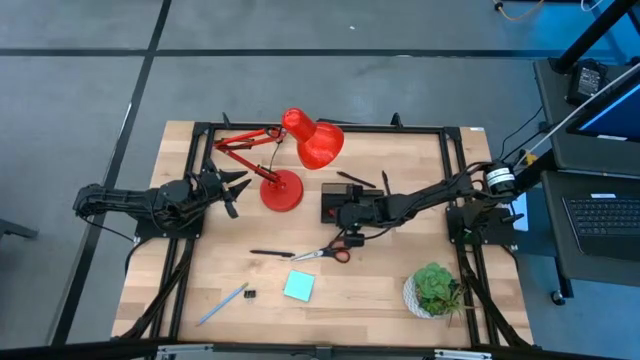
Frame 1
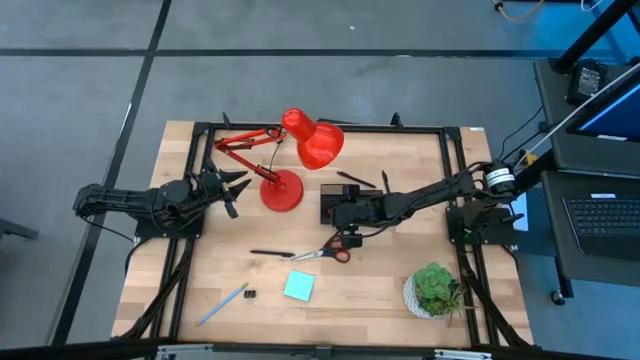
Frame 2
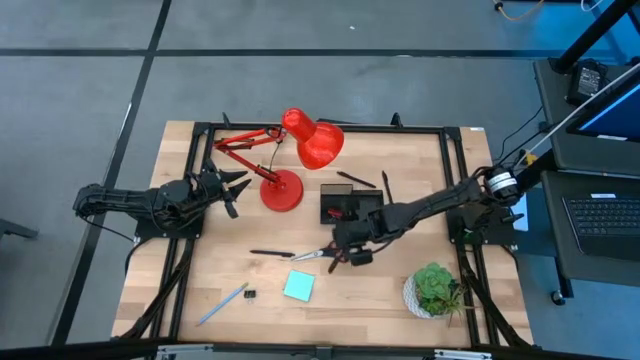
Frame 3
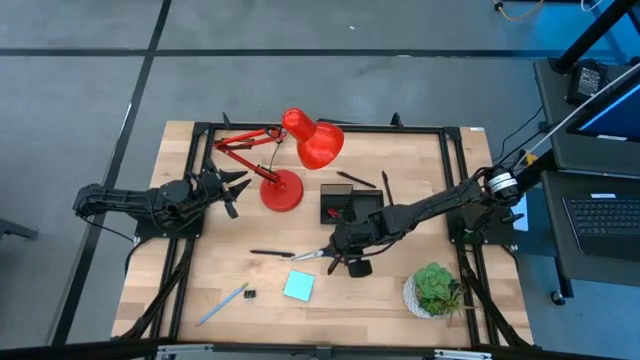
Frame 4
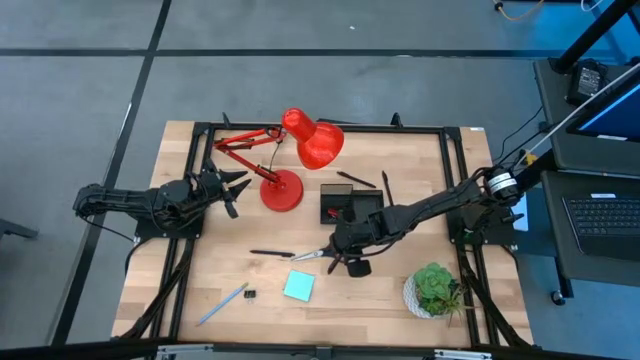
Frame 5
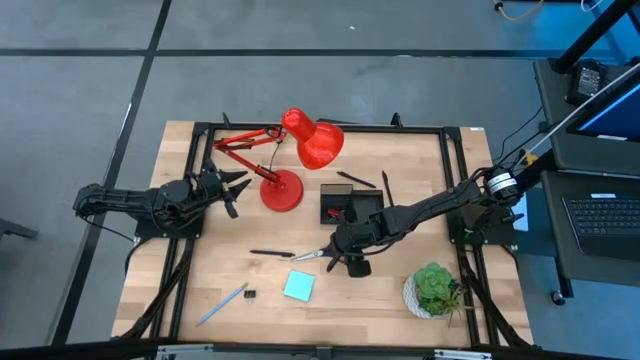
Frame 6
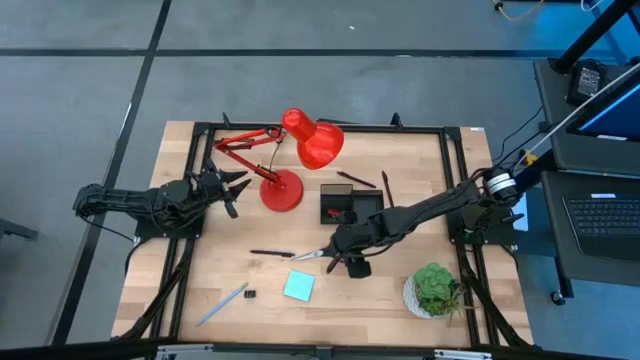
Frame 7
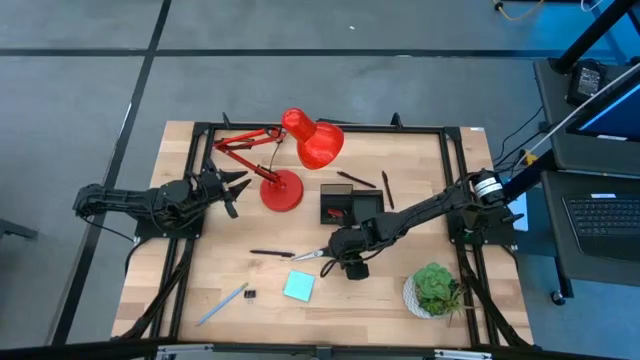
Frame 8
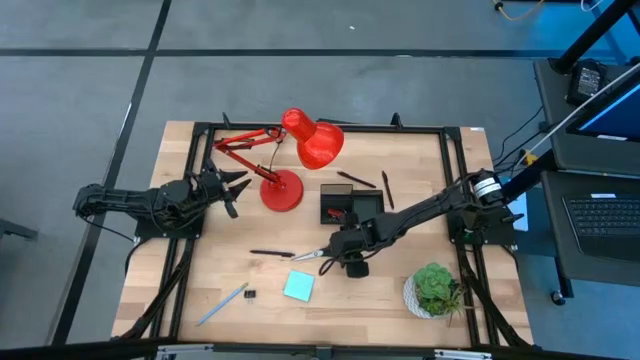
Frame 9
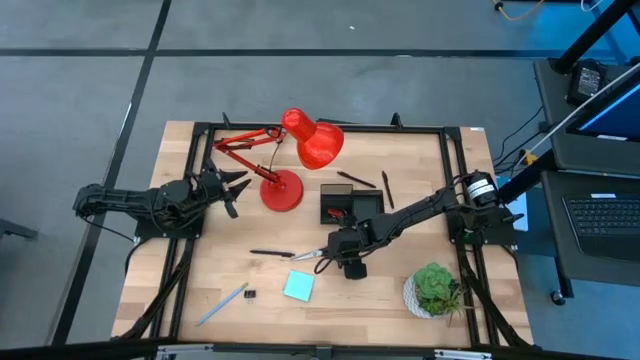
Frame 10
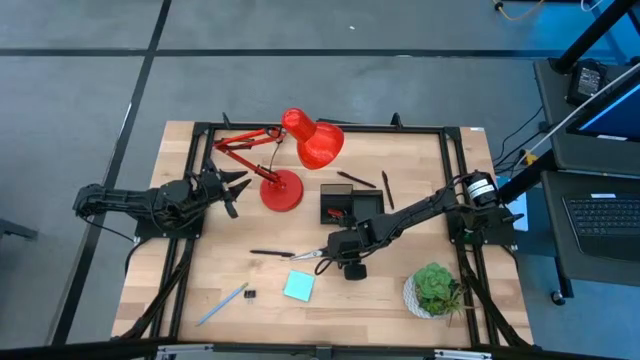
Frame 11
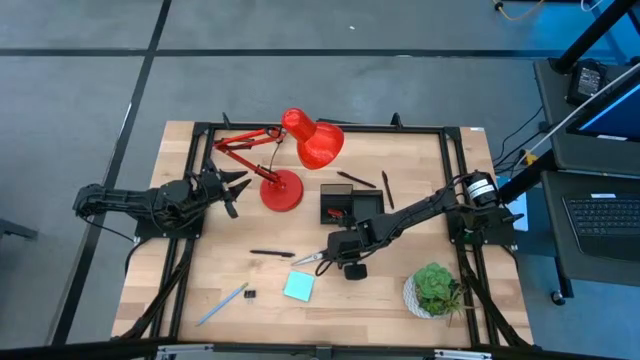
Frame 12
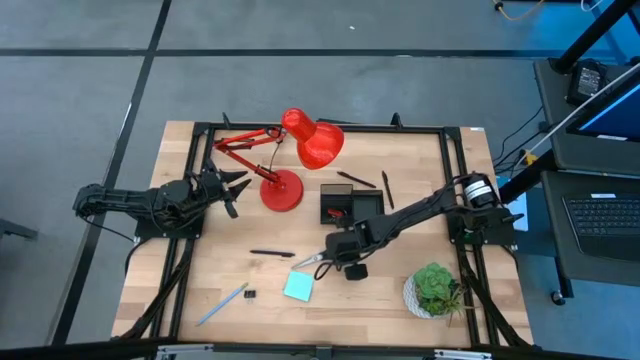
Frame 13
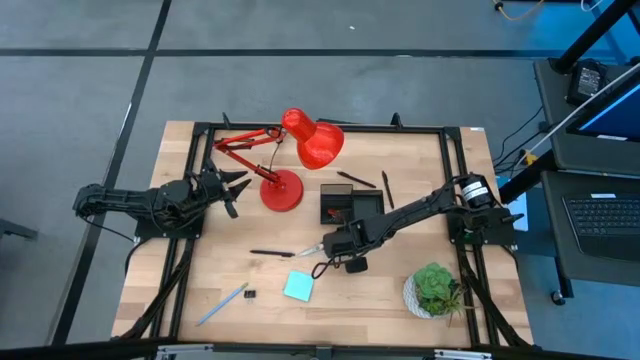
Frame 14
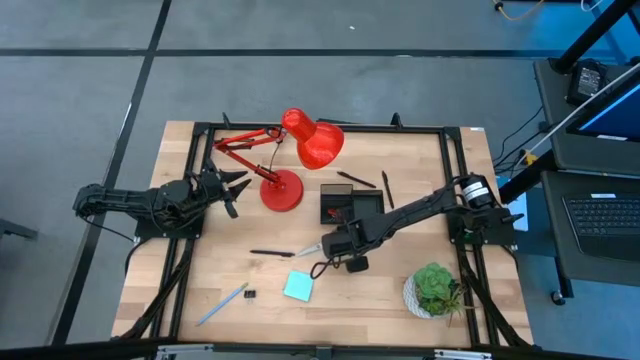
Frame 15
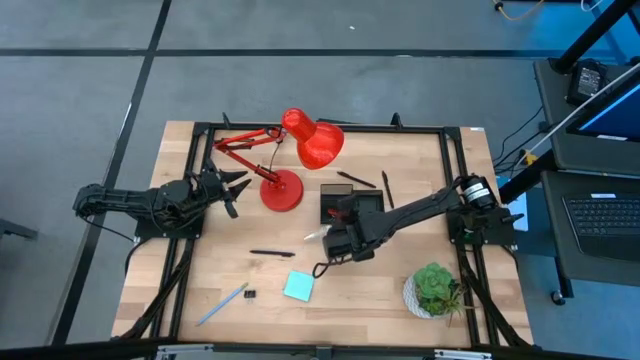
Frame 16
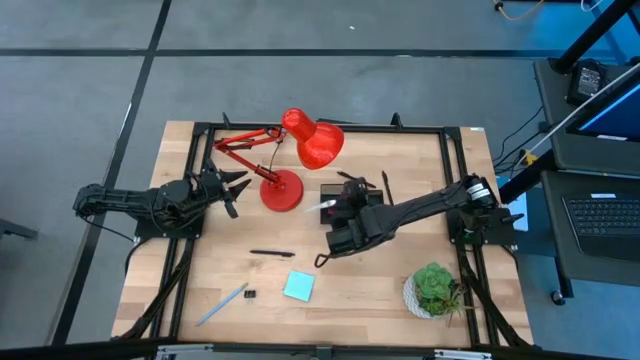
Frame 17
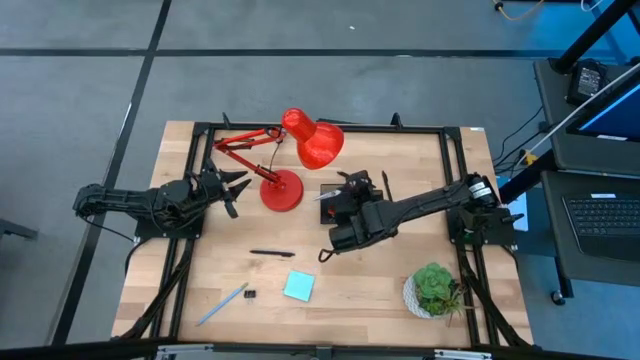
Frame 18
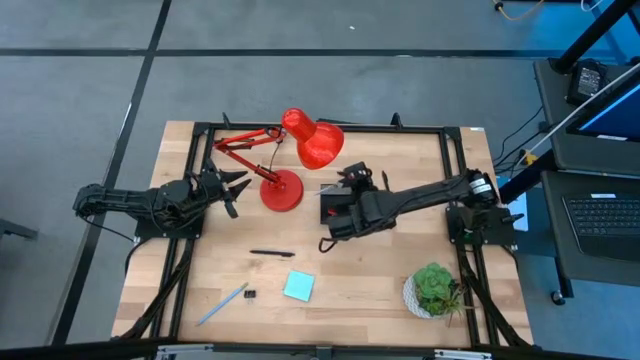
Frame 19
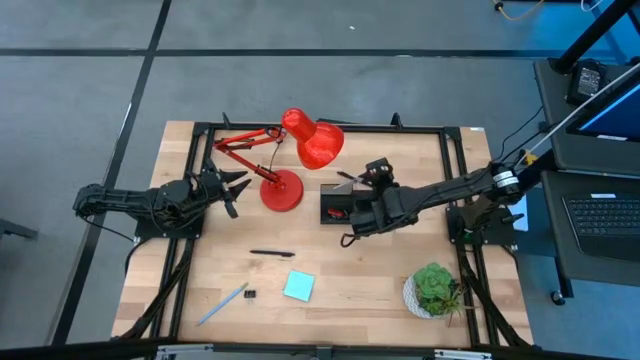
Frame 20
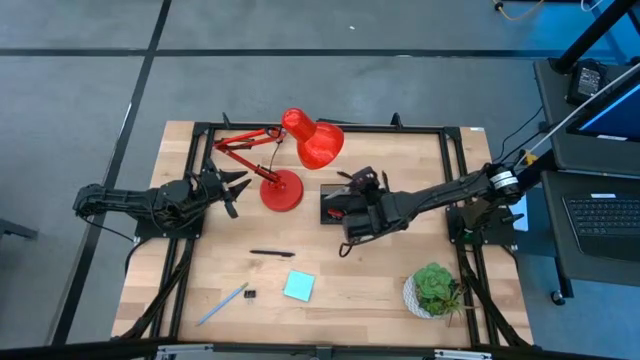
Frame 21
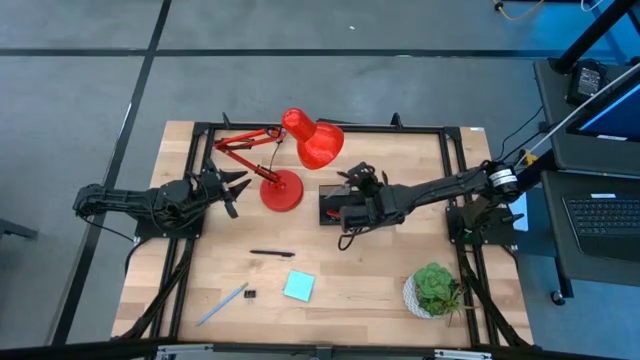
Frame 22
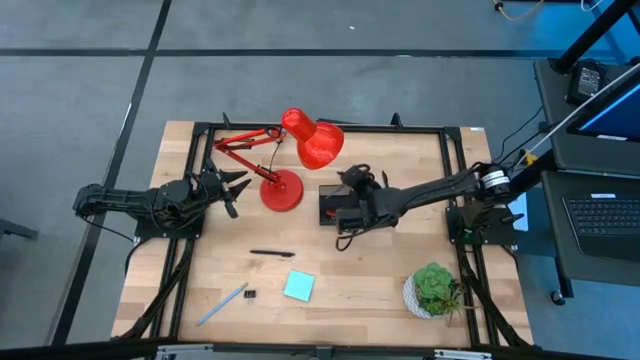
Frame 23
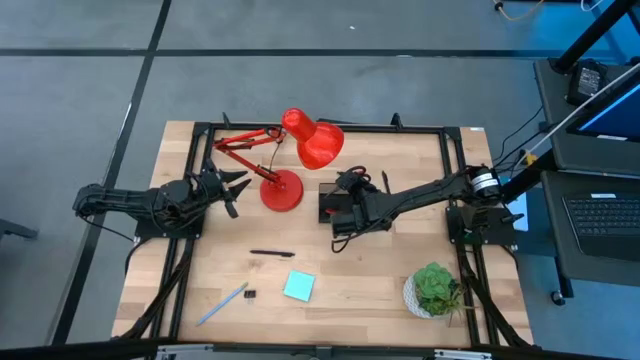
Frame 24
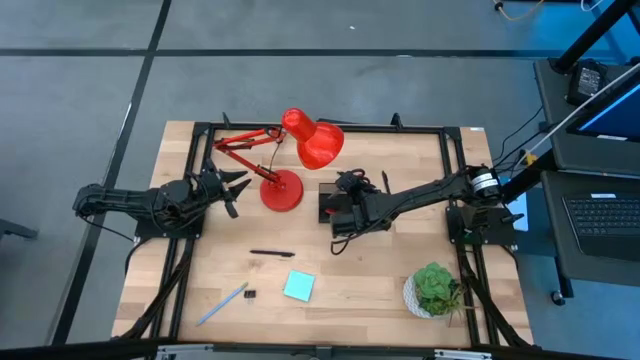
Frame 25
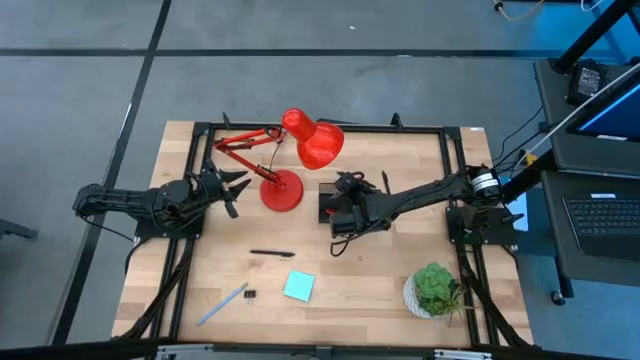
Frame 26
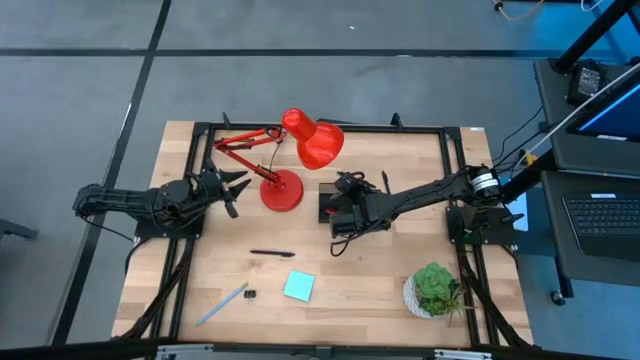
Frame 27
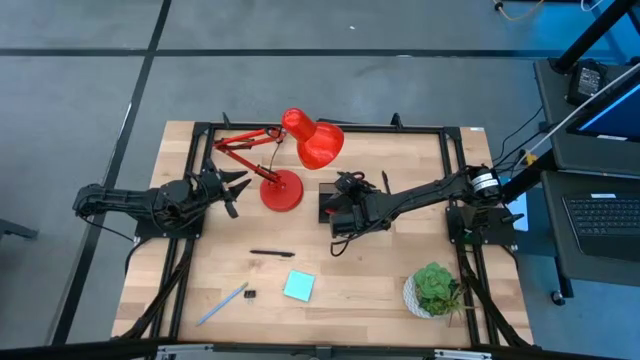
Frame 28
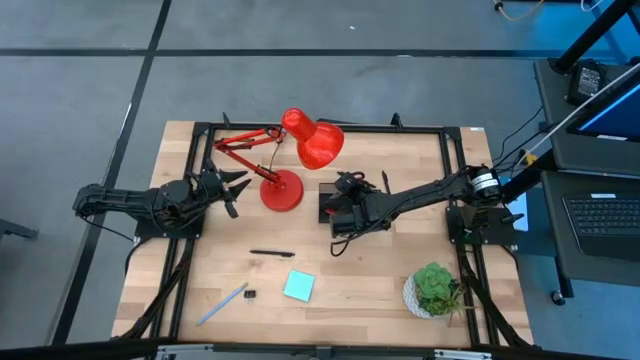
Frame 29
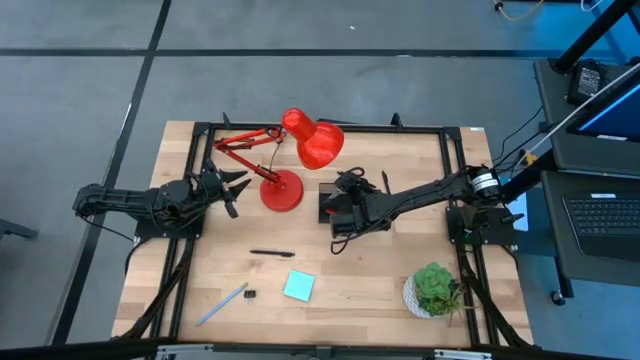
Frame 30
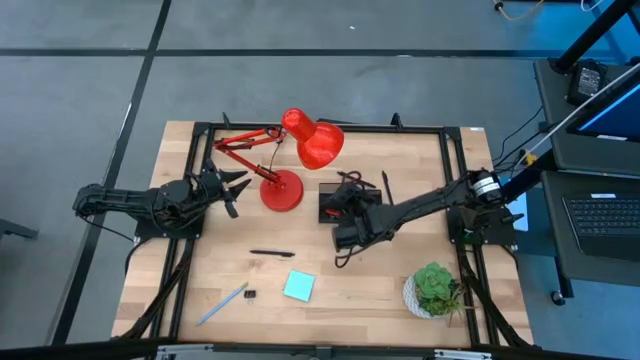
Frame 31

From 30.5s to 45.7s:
Task: Pick and place office supplies into organizer
Put the black scissor into the black desk organizer

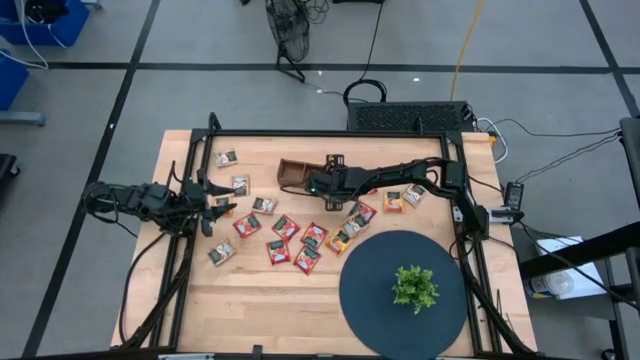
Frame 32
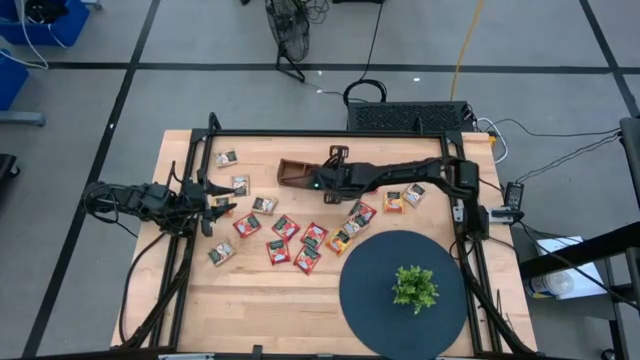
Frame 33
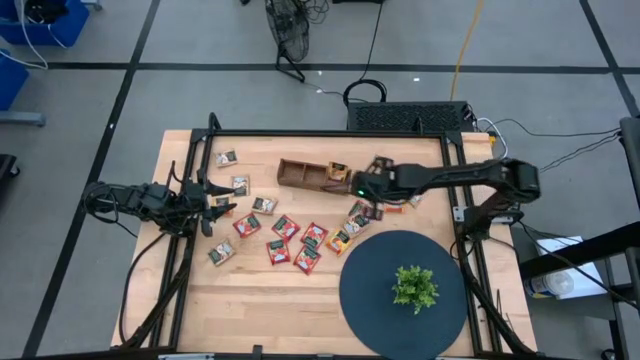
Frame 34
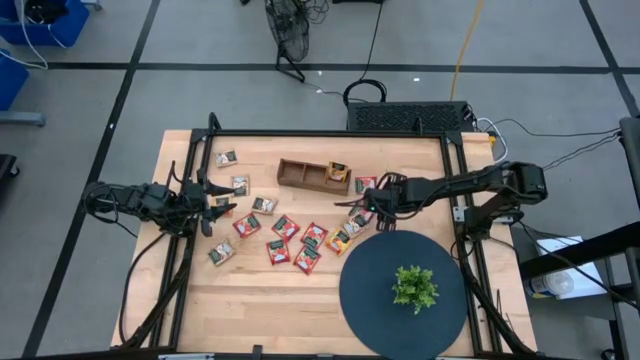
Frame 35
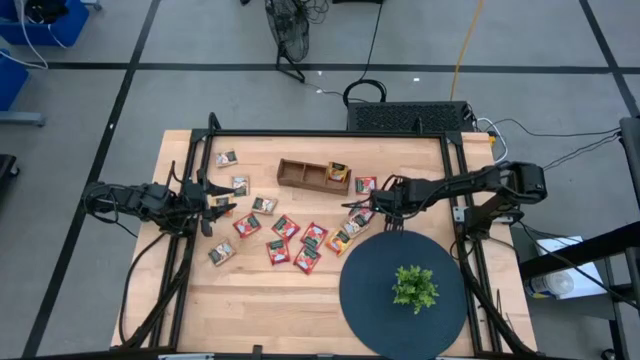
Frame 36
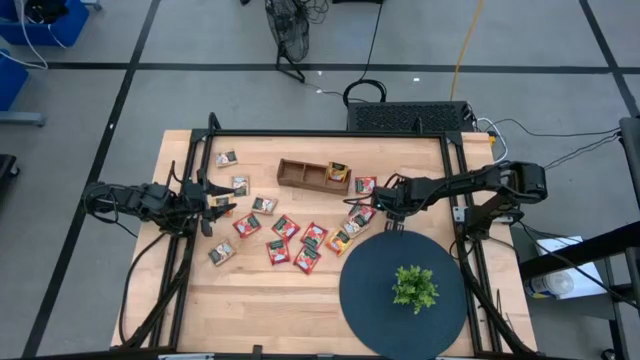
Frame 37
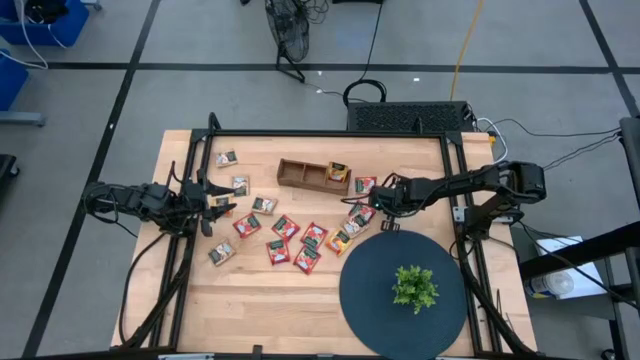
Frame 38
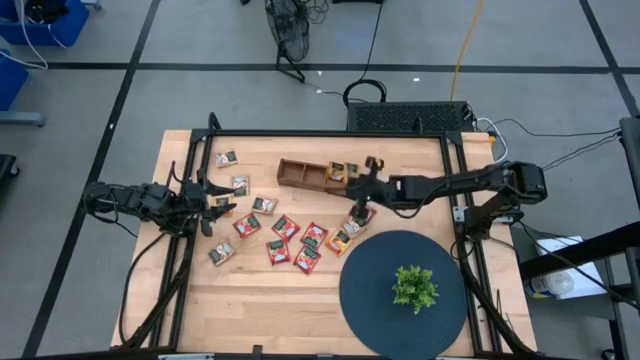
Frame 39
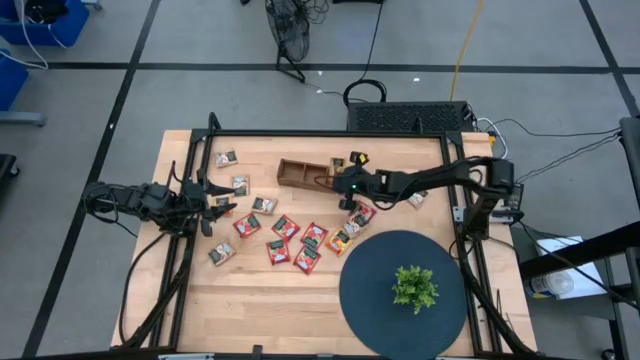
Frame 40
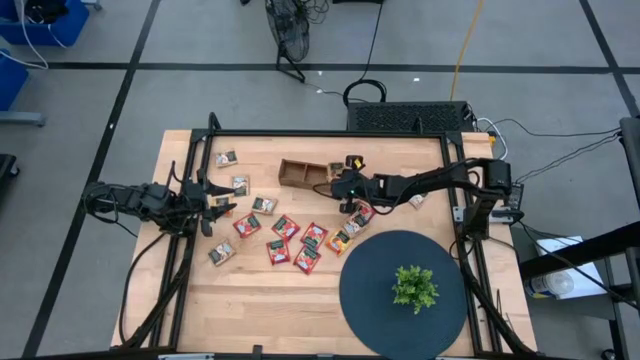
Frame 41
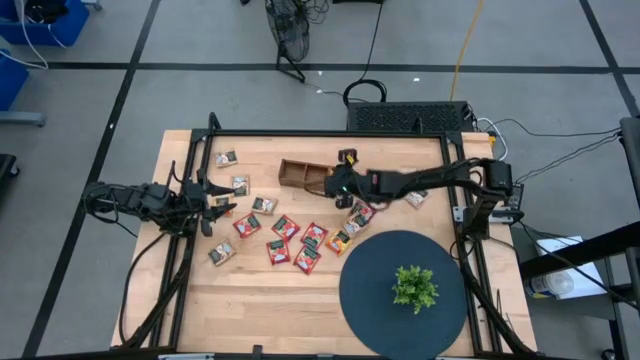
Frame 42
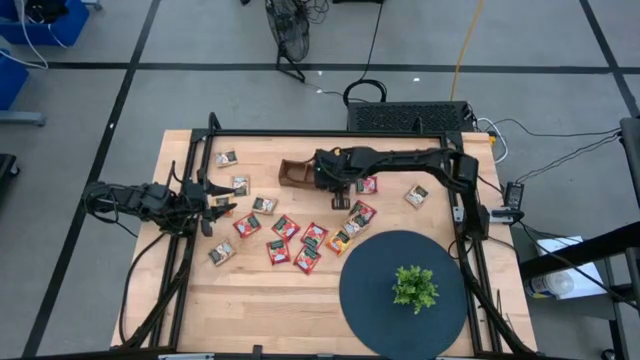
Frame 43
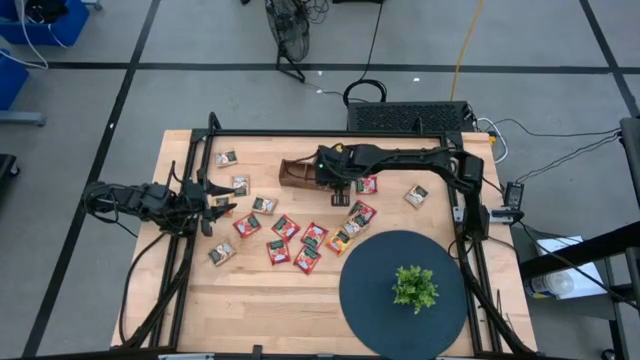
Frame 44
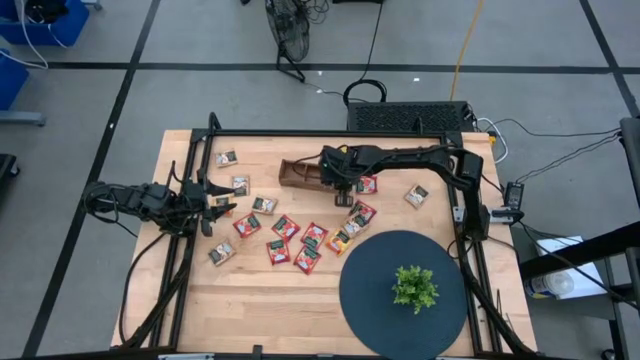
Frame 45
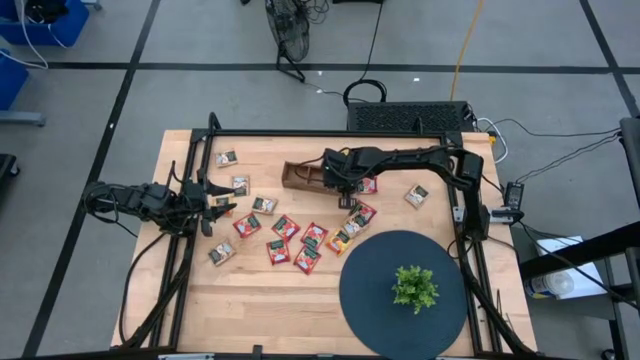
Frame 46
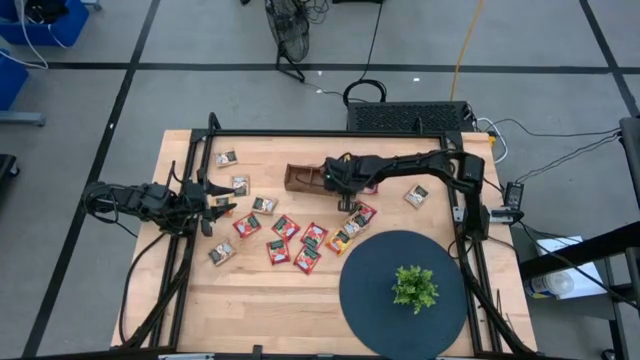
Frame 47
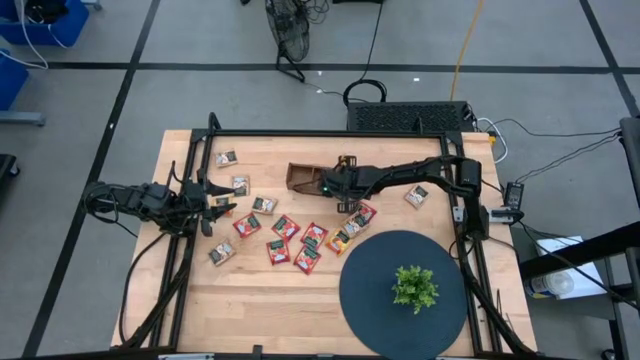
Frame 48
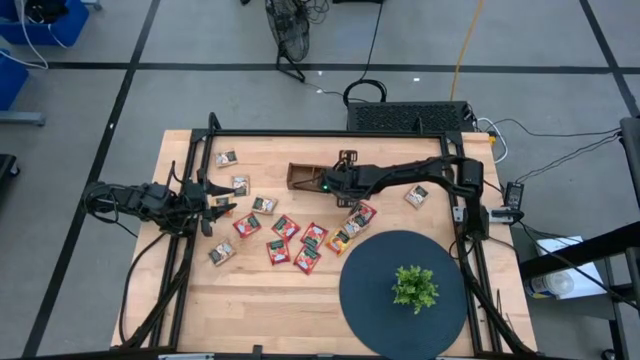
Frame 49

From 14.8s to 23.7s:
Task: Pick & Place Tea
Put the yellow tea bag into the right section wooden organizer
